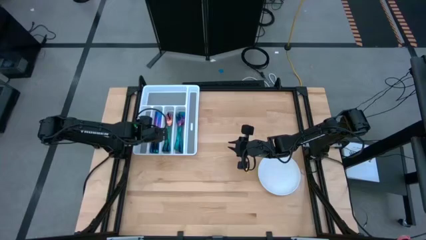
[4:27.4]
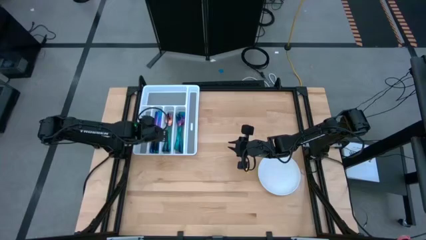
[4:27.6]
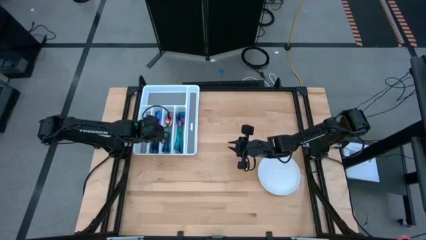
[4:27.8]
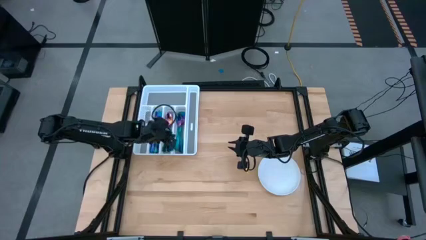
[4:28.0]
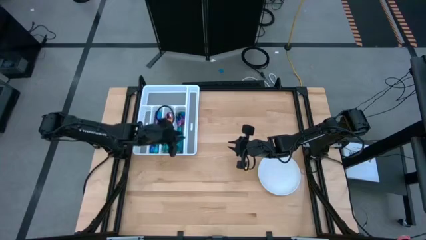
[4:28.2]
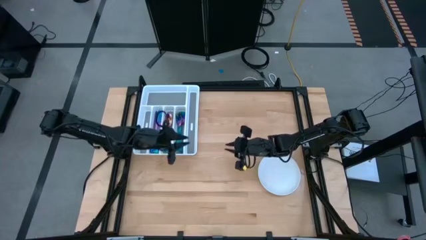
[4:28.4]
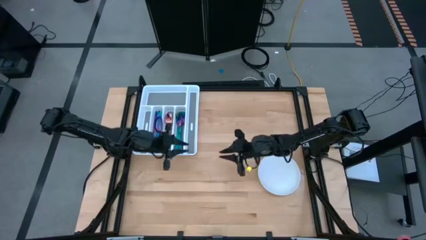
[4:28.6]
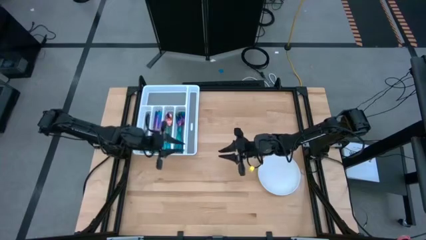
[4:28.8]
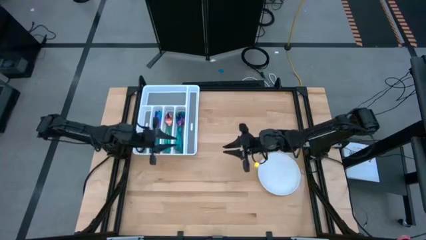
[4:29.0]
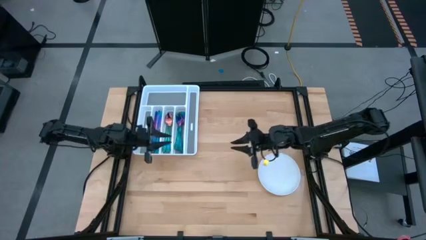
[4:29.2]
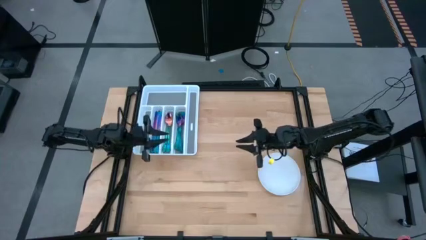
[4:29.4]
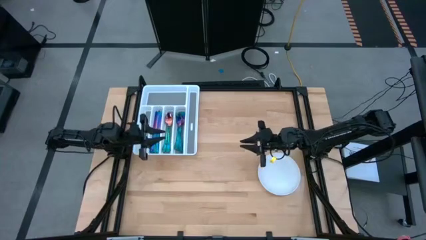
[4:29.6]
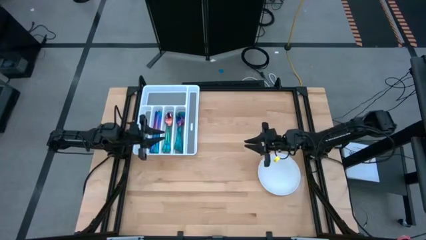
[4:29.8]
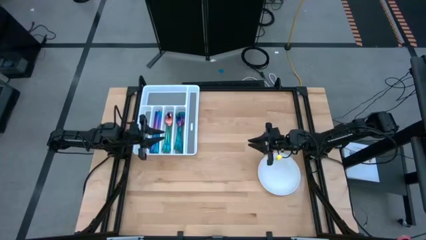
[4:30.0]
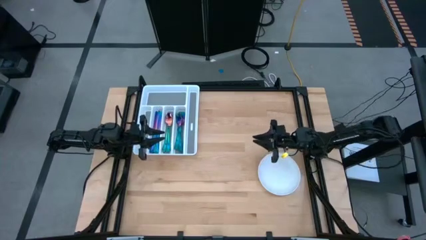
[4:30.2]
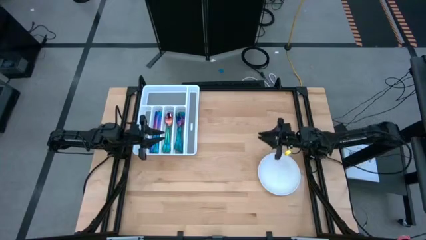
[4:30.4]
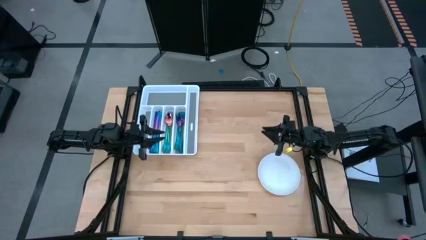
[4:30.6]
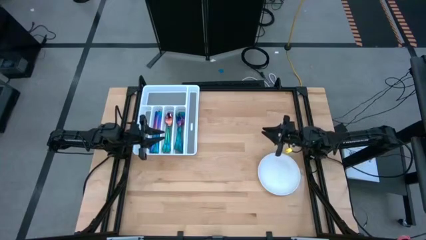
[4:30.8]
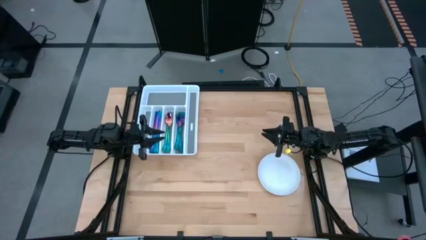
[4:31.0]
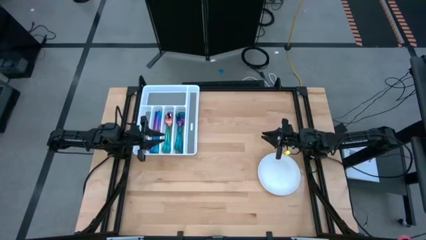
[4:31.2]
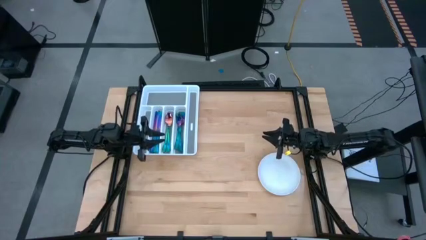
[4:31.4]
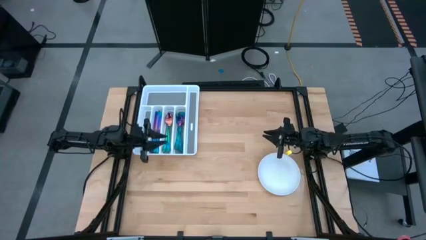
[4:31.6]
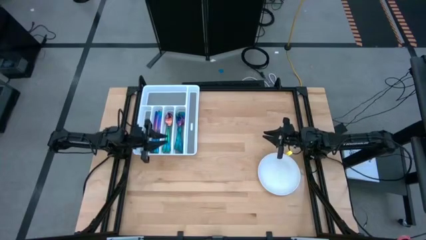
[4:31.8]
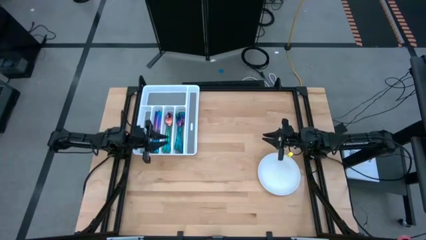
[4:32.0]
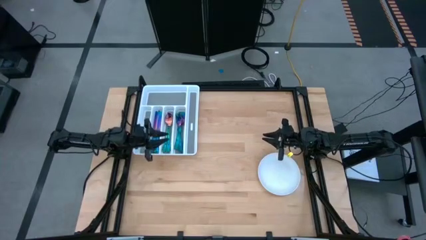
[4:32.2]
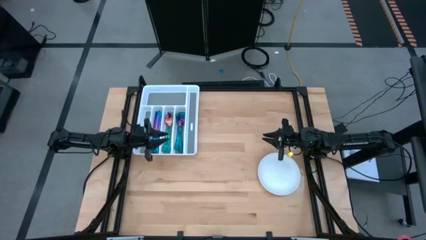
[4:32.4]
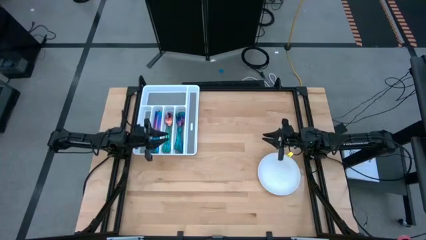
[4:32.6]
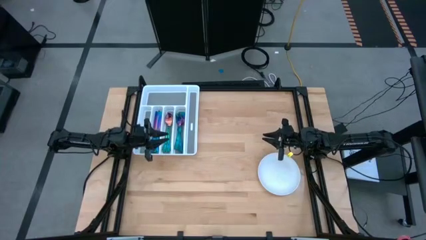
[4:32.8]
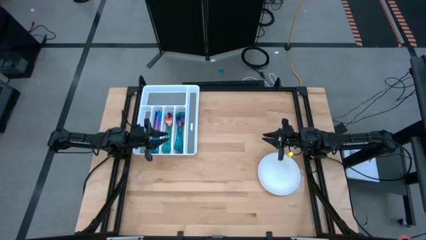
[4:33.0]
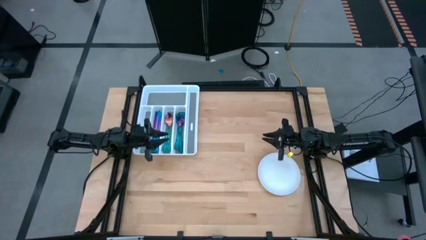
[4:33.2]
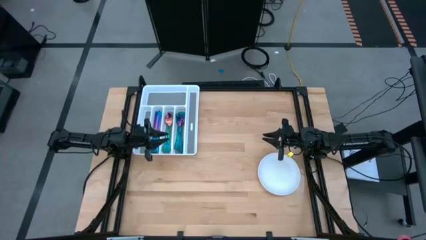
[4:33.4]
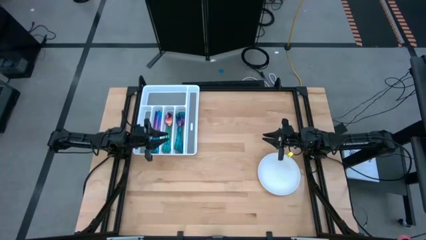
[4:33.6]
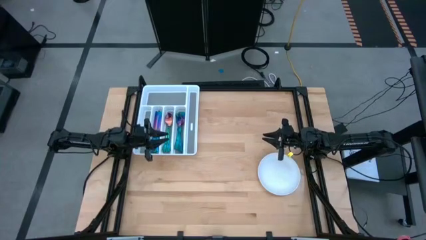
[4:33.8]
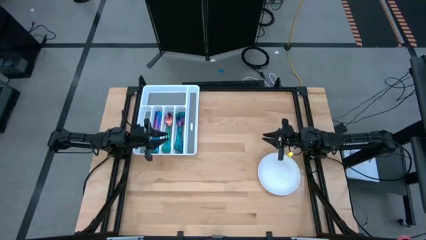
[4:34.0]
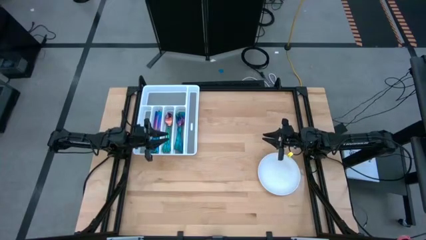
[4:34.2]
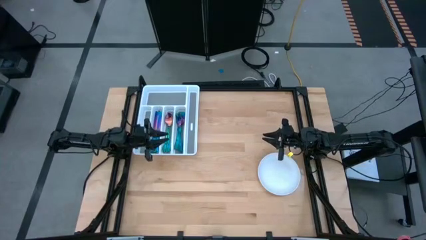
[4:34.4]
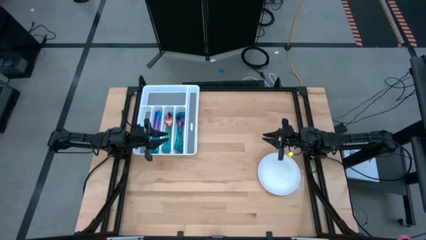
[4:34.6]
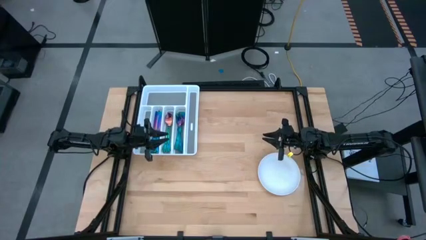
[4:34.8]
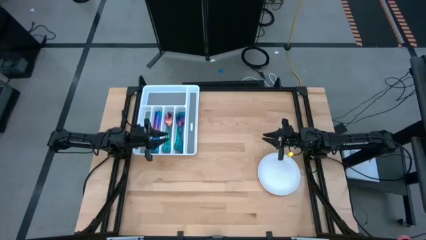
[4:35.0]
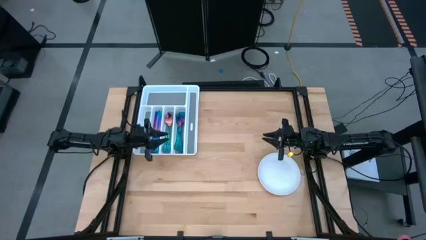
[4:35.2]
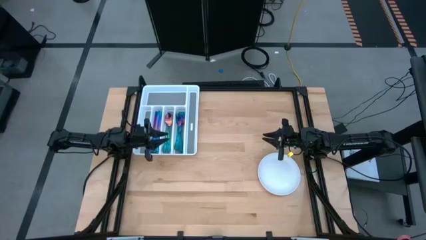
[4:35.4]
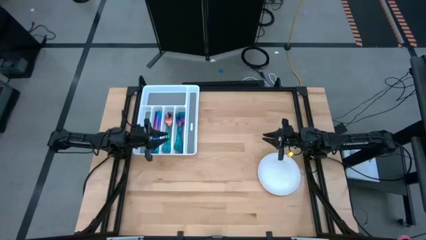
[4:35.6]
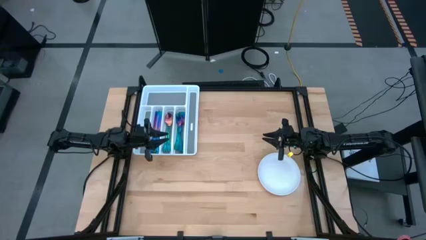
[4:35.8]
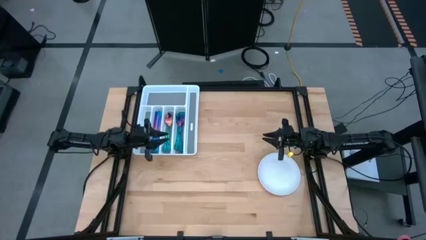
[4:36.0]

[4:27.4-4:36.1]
Task: Sort silverware
Return to Home Position

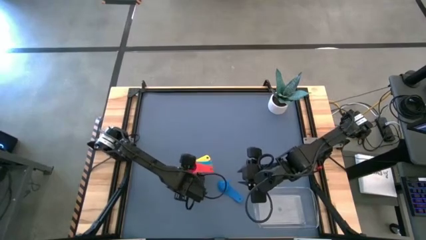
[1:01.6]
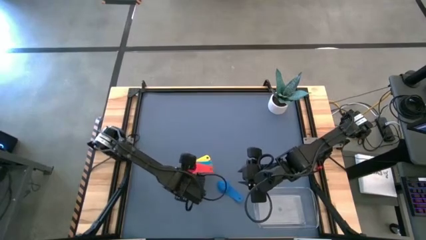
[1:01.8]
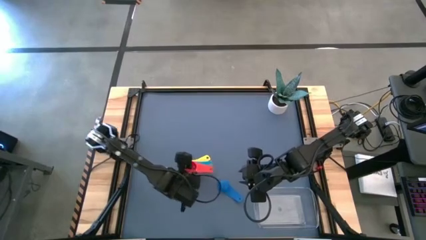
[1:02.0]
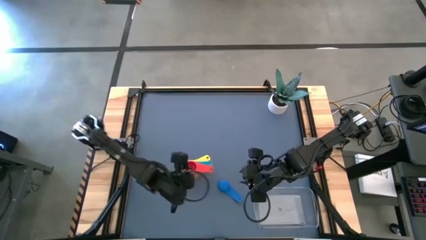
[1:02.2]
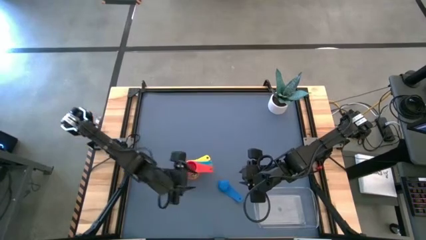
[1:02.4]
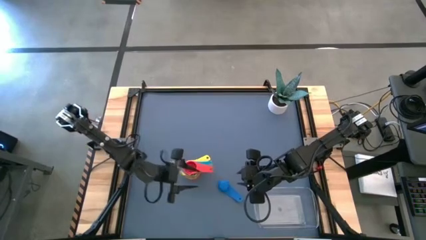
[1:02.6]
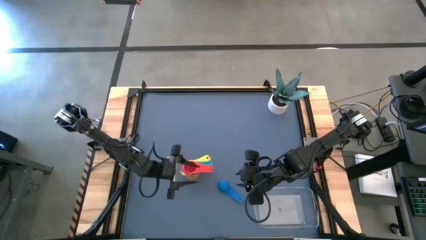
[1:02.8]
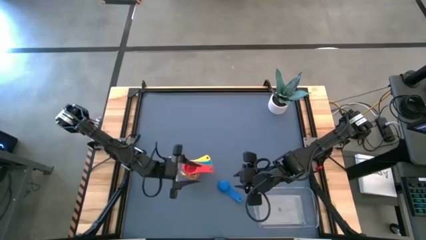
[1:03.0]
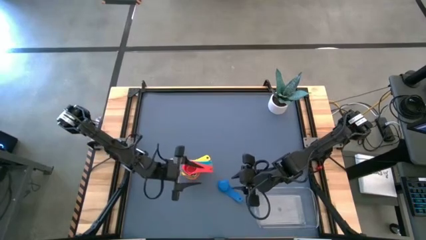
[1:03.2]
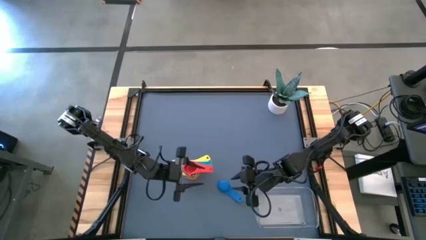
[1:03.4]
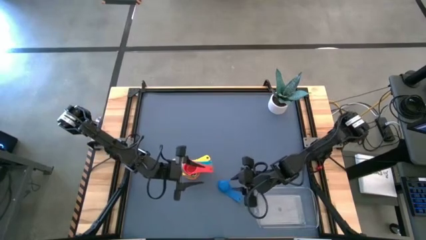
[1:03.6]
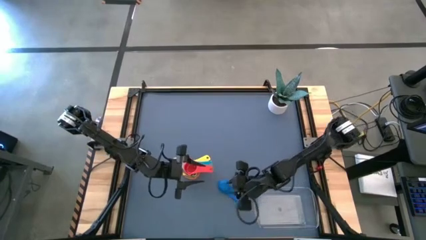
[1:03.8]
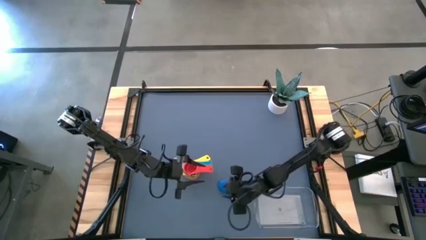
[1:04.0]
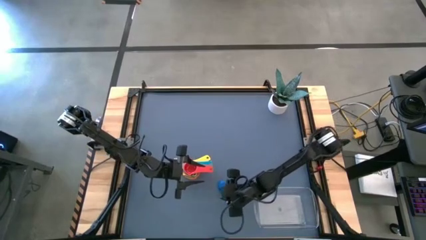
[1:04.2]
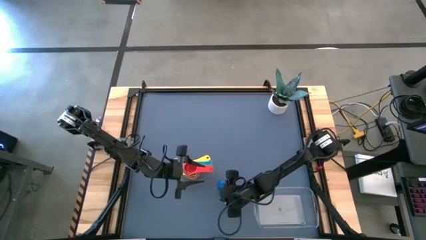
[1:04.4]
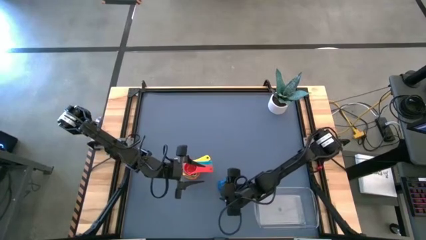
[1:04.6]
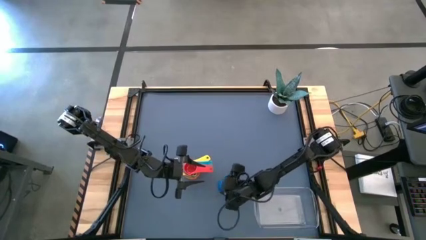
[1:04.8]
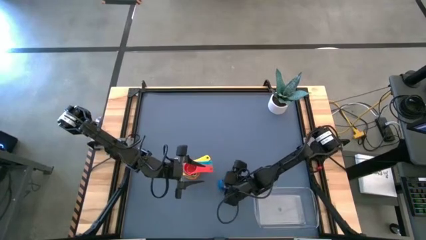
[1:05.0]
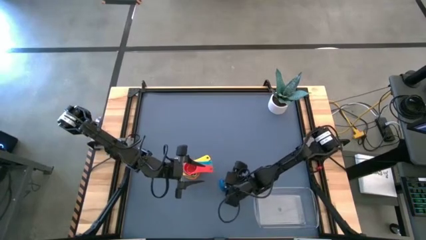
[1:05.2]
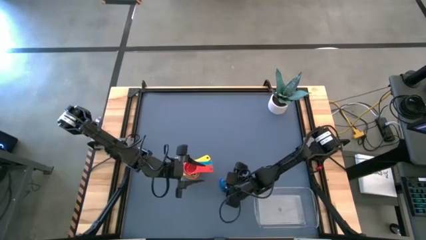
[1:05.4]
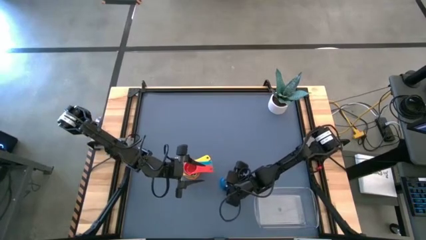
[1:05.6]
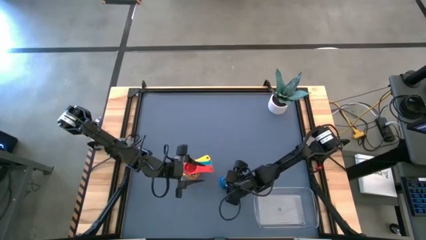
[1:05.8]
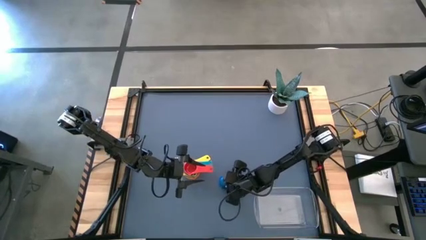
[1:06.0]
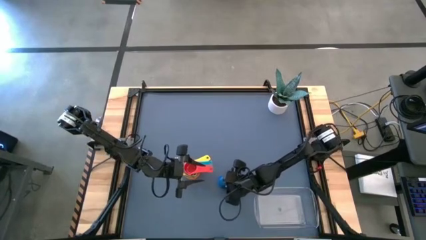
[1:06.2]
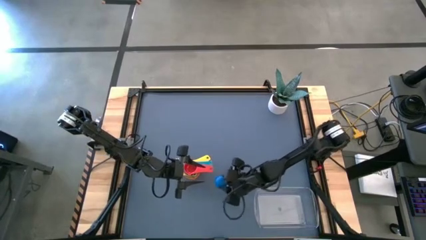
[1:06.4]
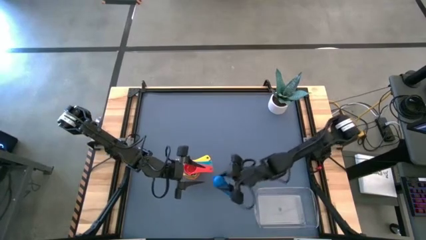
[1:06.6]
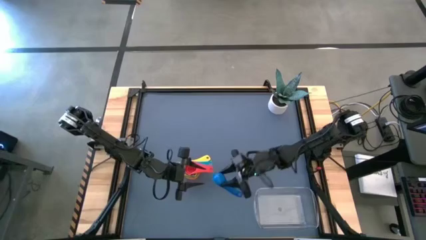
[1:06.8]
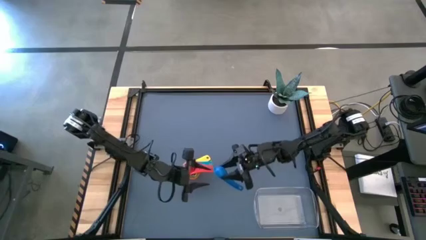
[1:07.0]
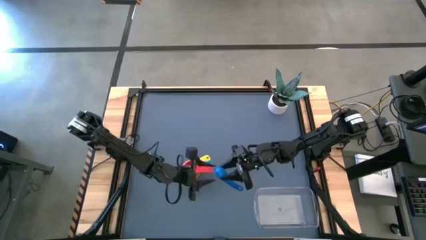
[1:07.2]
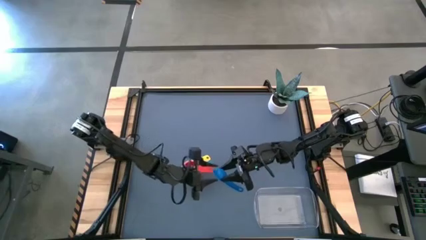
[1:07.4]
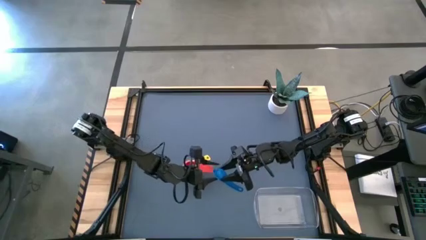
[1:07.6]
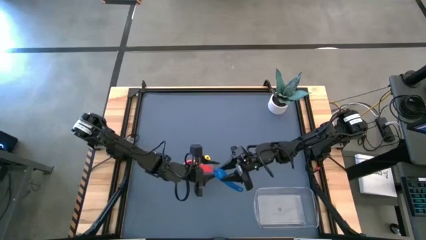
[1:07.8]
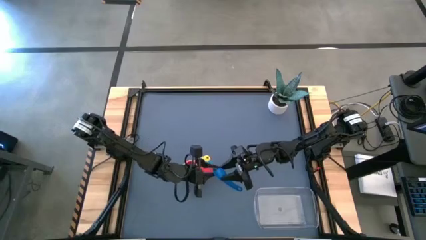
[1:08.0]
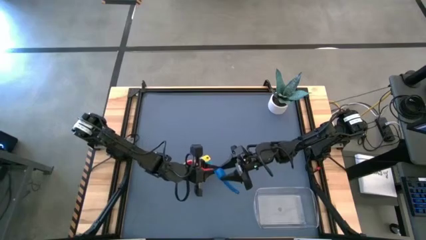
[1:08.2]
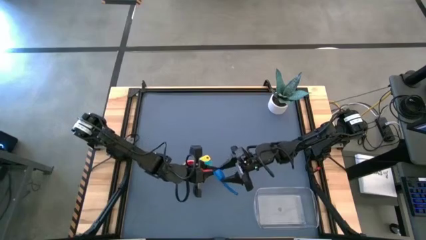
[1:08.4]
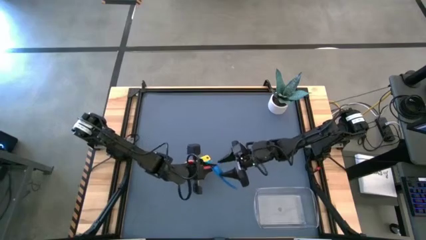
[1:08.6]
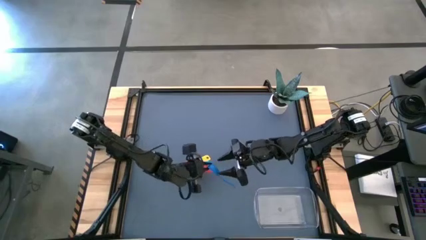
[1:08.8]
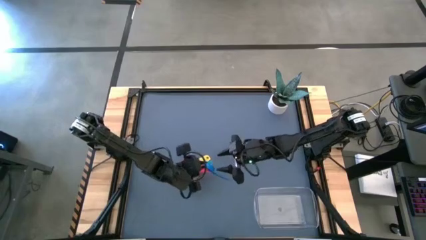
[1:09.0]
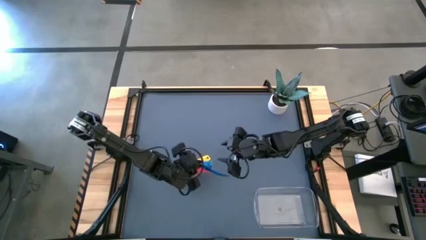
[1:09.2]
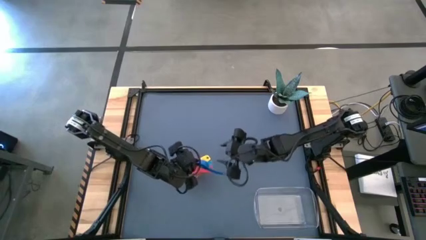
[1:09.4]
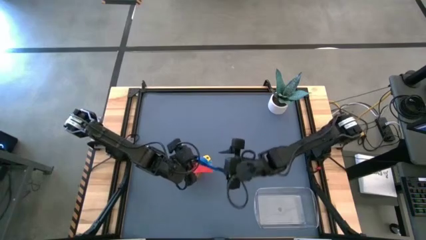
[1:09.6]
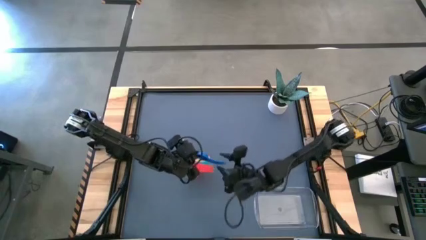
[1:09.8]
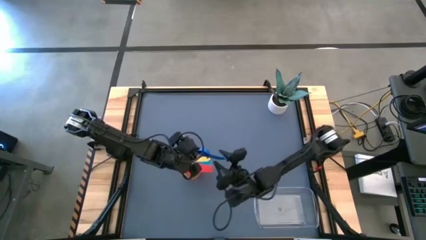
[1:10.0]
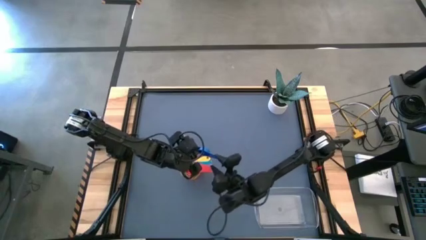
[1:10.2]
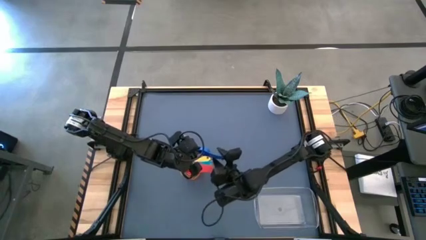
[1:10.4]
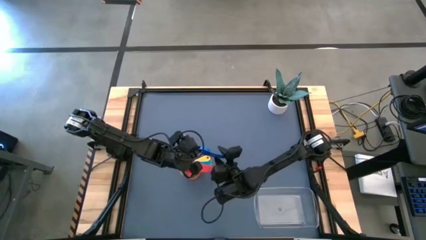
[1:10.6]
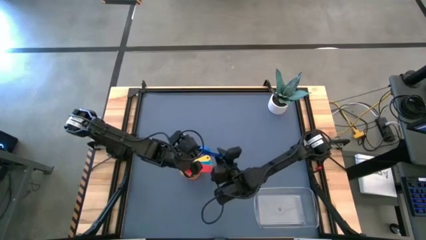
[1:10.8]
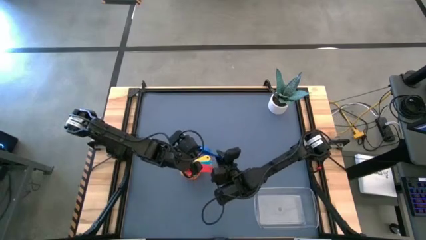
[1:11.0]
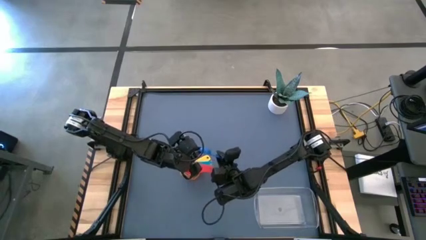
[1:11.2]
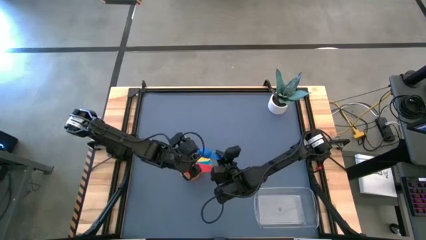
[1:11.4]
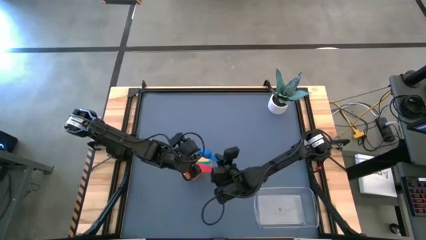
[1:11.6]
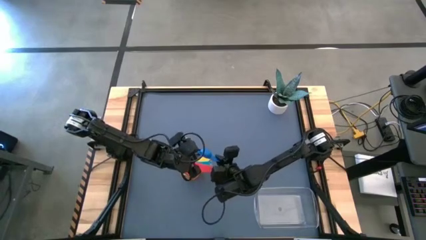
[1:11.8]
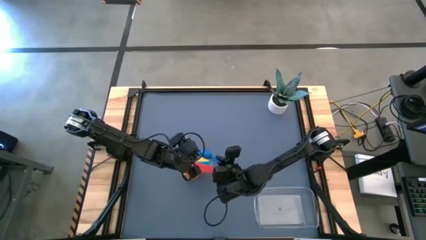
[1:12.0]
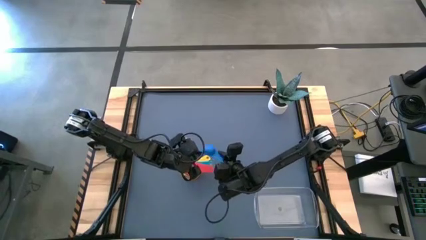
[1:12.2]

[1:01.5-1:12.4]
Task: Nest measuring cups in basket
Stack the blue measuring cup on top of the red measuring cup
